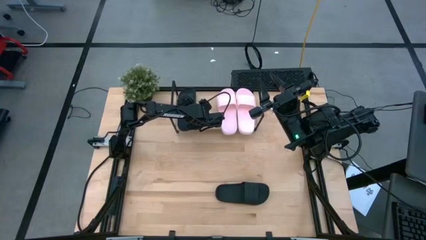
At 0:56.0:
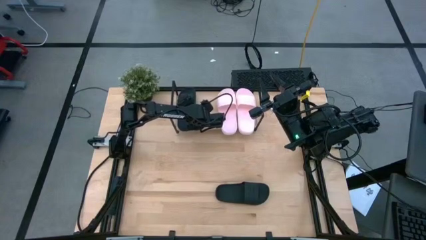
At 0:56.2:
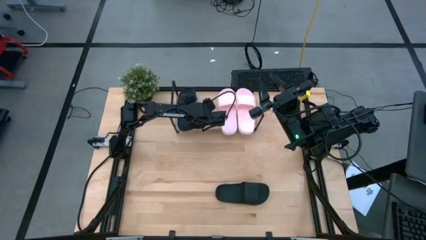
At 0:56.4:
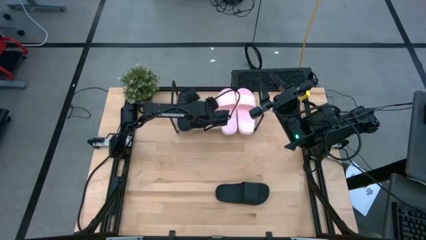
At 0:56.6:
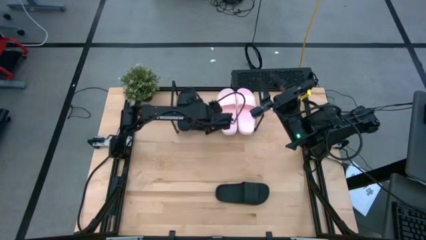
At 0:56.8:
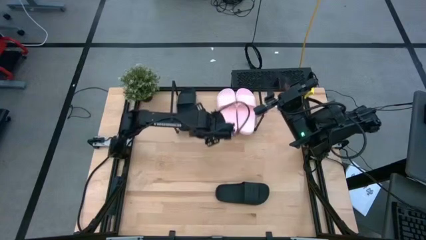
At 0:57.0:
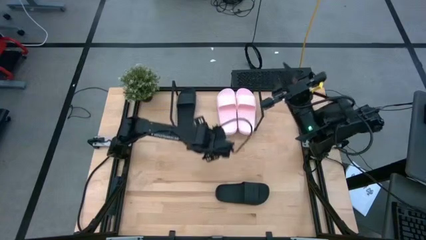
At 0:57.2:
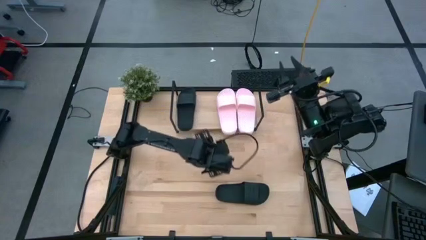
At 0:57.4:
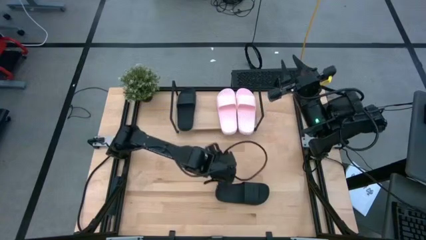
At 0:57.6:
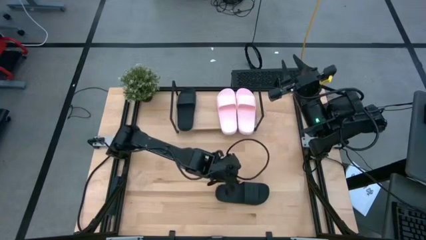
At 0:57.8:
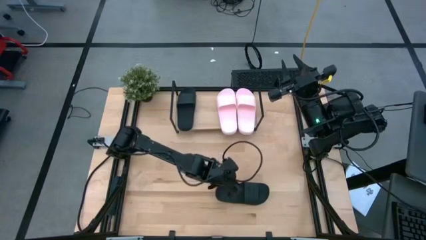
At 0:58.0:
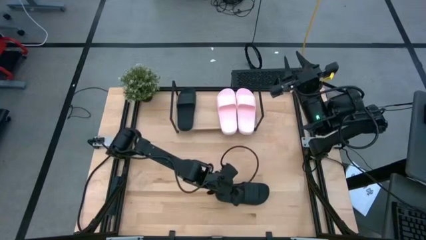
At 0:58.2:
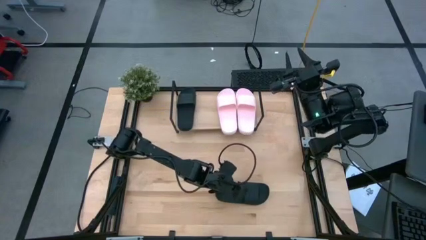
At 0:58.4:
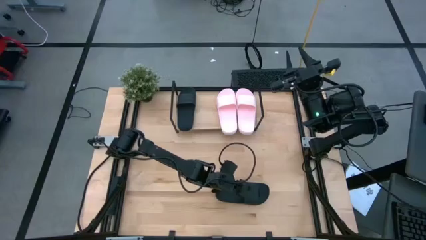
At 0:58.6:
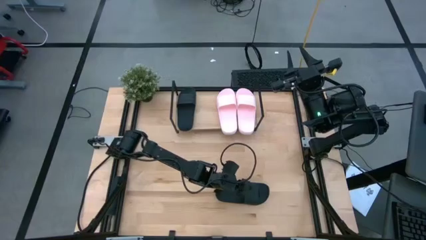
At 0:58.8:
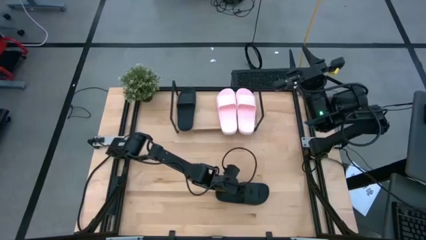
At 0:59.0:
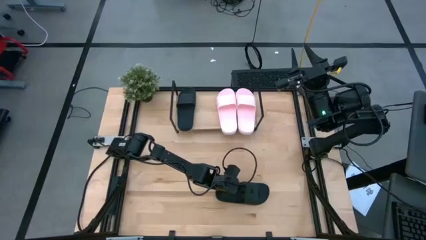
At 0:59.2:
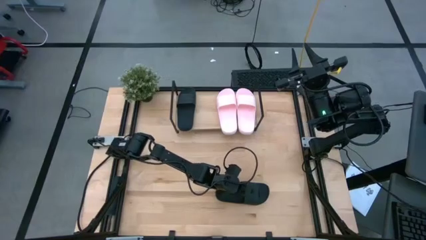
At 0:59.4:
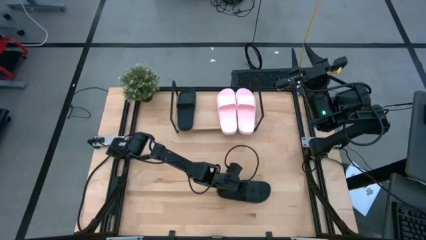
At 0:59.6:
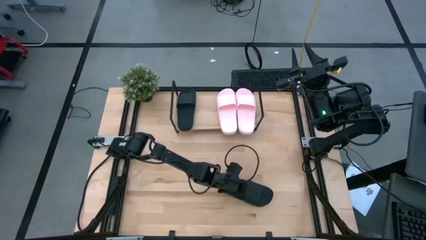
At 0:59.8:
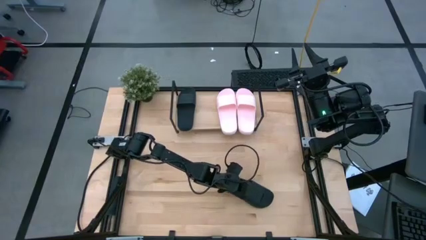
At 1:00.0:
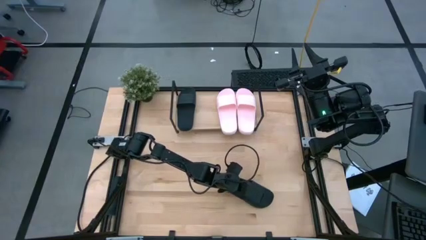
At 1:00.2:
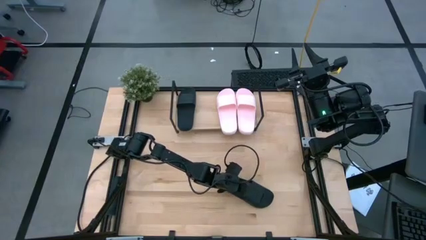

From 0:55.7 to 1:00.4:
Task: Pick and place slides into the shelf
Put the black slide on the shelf

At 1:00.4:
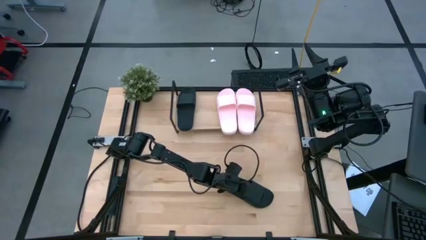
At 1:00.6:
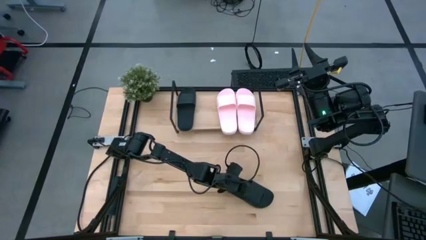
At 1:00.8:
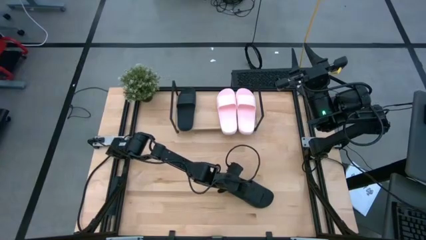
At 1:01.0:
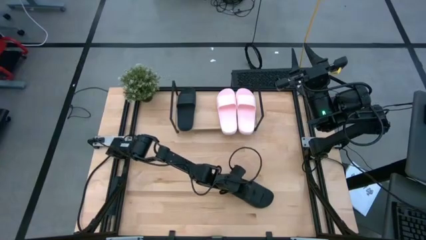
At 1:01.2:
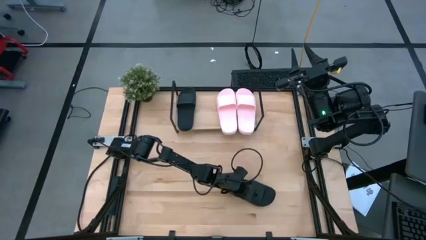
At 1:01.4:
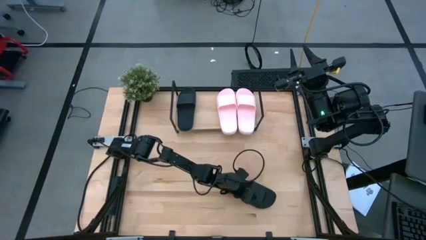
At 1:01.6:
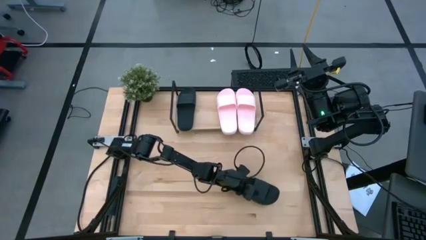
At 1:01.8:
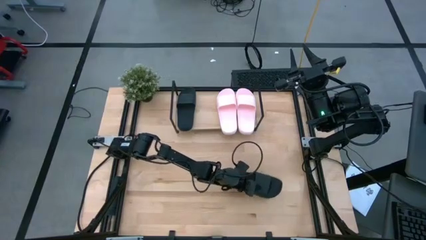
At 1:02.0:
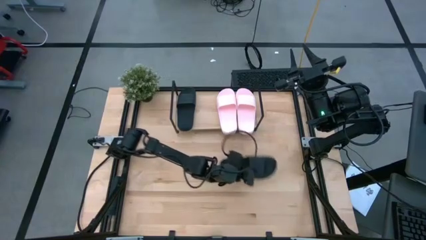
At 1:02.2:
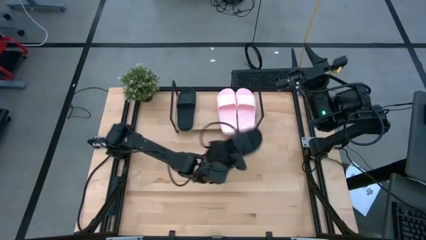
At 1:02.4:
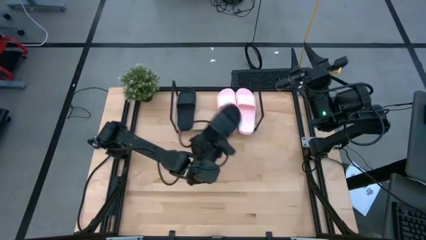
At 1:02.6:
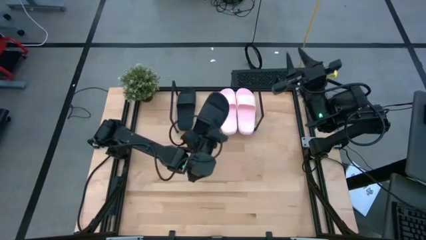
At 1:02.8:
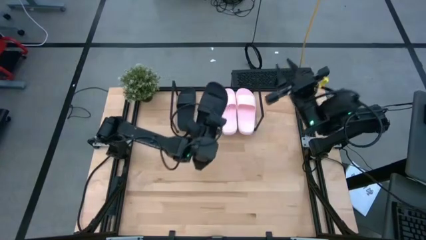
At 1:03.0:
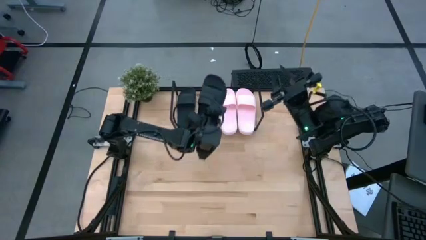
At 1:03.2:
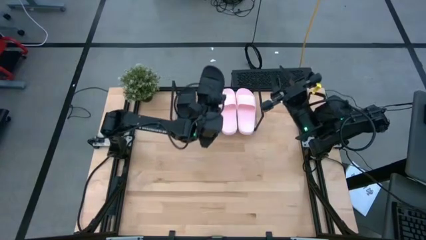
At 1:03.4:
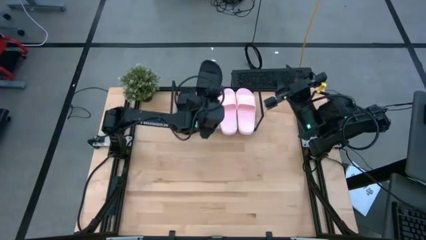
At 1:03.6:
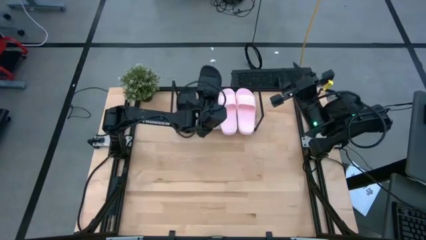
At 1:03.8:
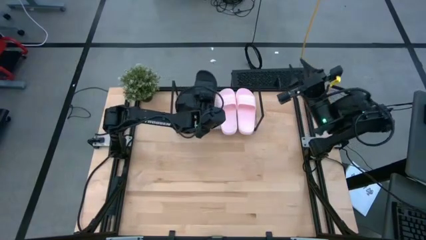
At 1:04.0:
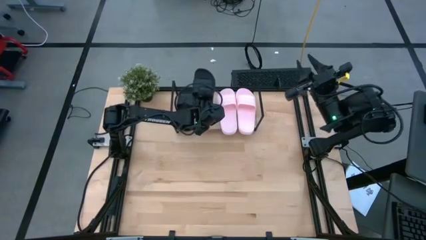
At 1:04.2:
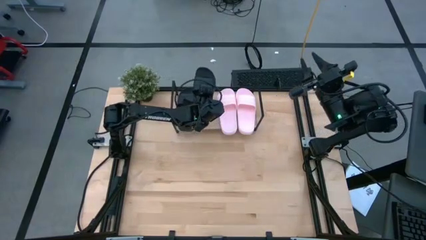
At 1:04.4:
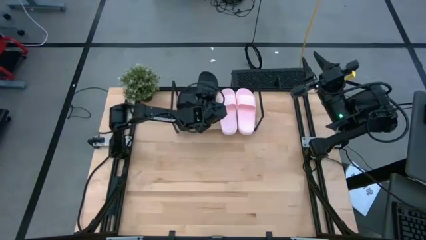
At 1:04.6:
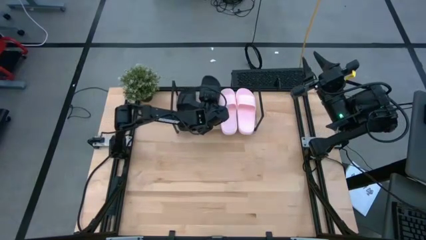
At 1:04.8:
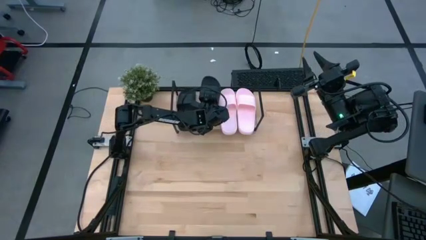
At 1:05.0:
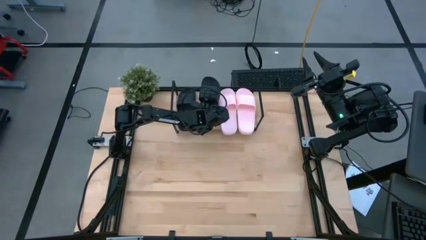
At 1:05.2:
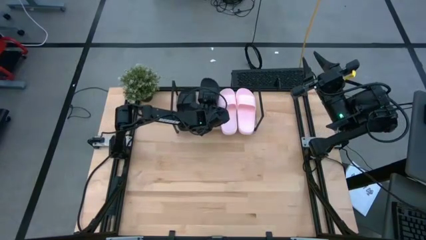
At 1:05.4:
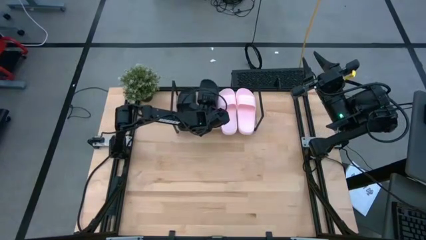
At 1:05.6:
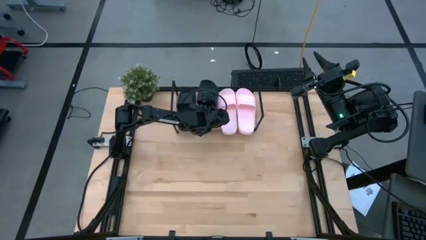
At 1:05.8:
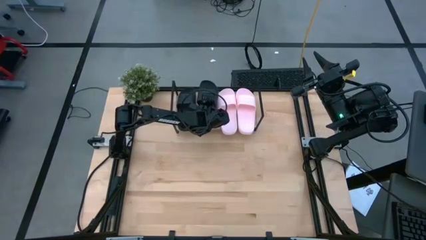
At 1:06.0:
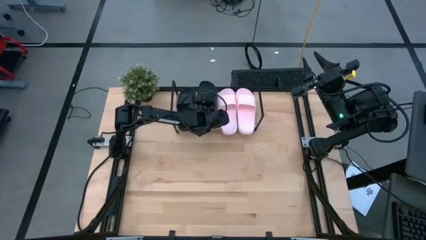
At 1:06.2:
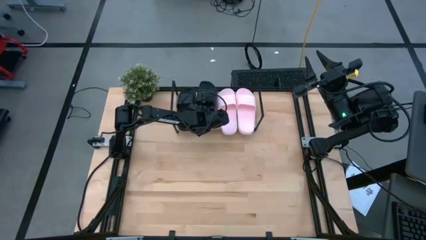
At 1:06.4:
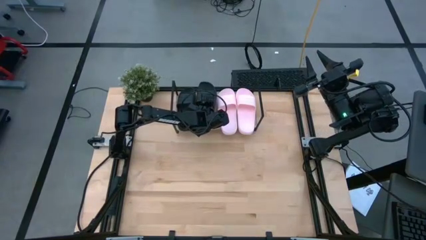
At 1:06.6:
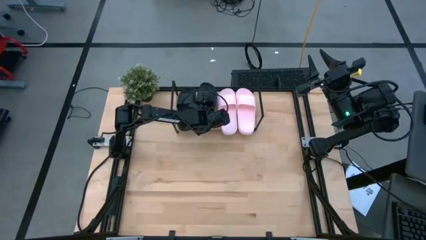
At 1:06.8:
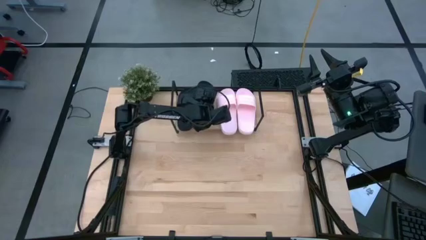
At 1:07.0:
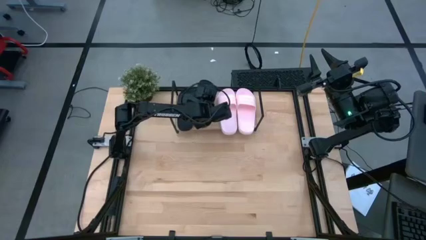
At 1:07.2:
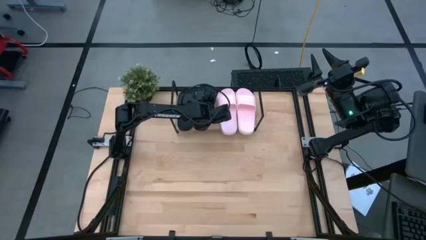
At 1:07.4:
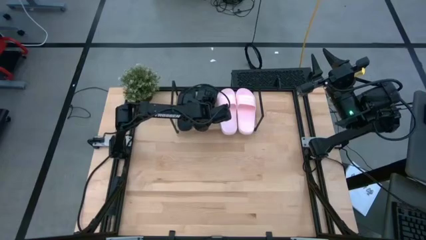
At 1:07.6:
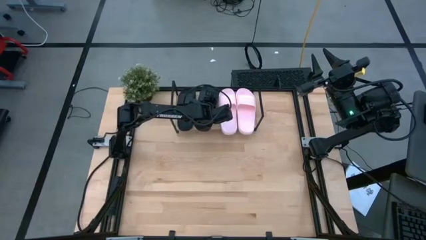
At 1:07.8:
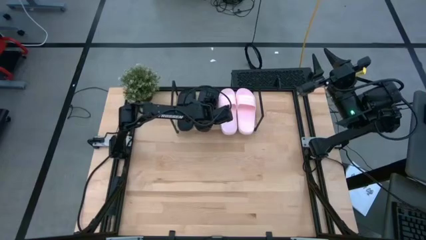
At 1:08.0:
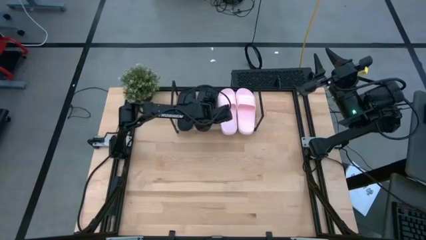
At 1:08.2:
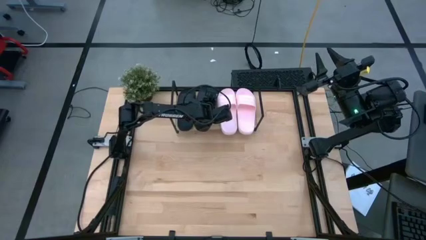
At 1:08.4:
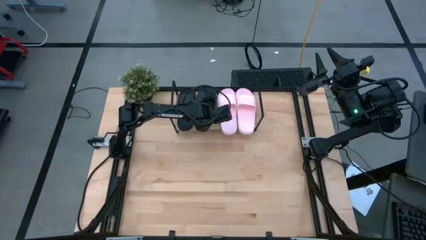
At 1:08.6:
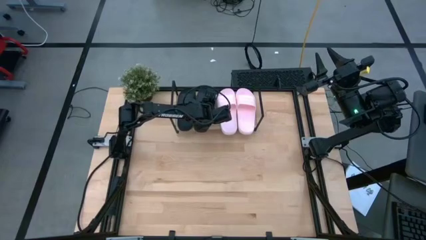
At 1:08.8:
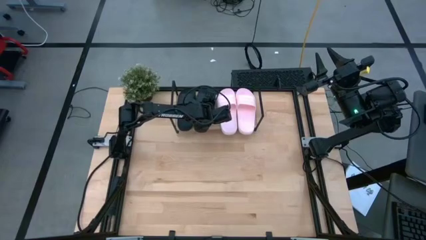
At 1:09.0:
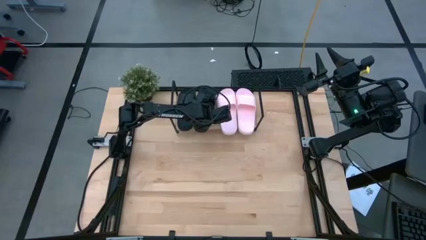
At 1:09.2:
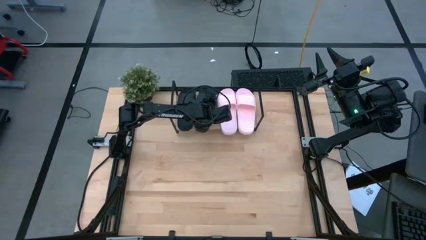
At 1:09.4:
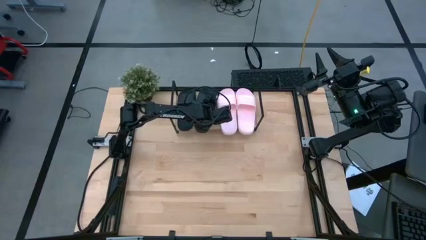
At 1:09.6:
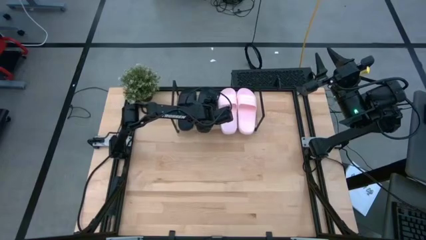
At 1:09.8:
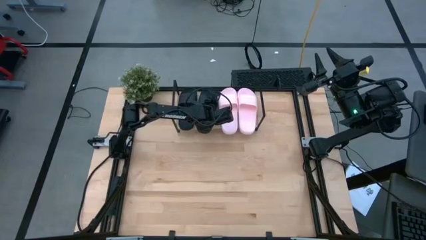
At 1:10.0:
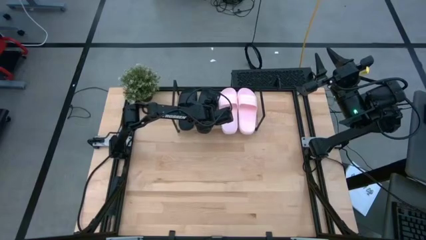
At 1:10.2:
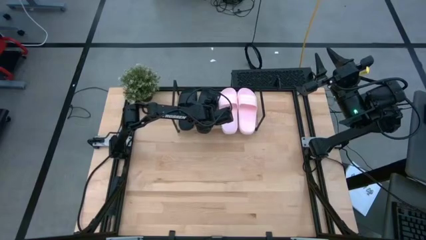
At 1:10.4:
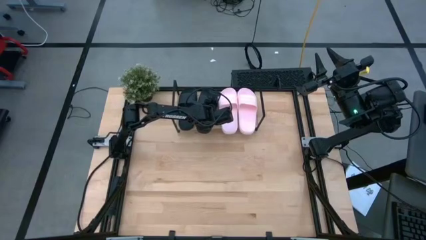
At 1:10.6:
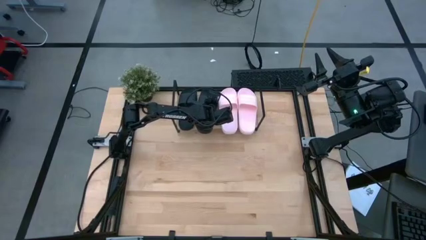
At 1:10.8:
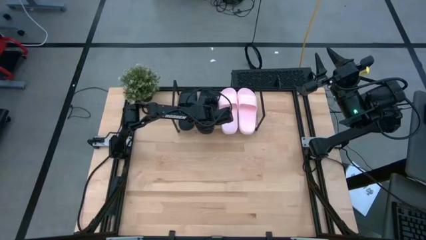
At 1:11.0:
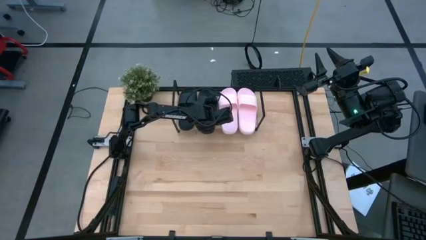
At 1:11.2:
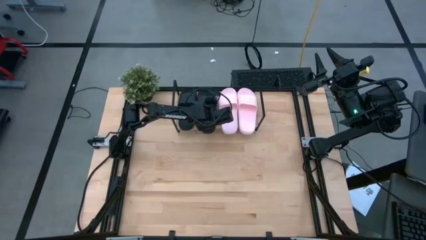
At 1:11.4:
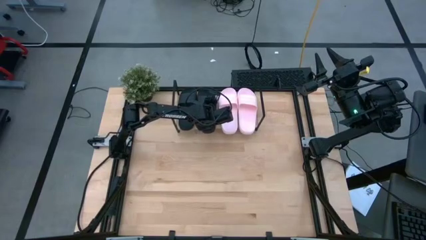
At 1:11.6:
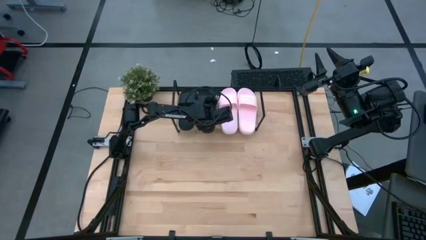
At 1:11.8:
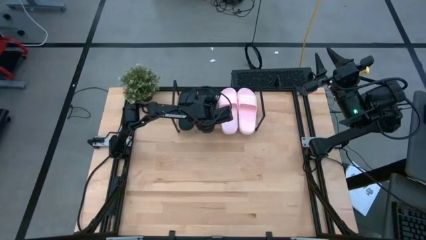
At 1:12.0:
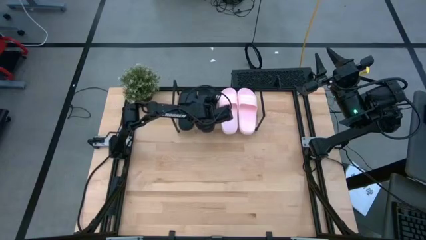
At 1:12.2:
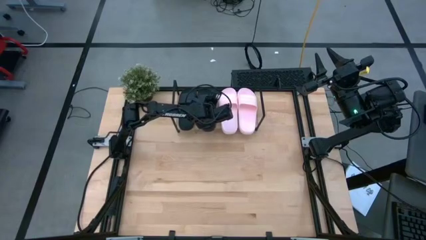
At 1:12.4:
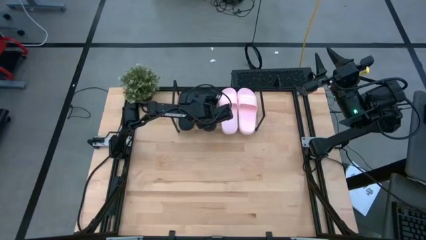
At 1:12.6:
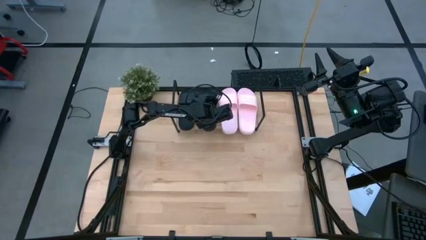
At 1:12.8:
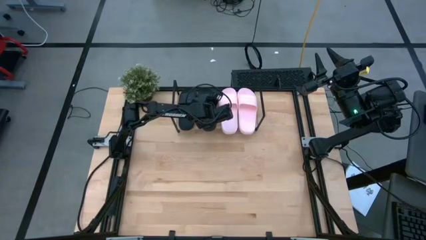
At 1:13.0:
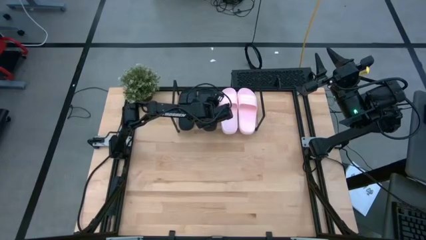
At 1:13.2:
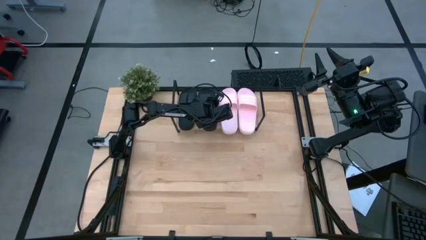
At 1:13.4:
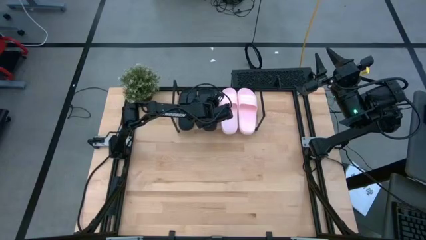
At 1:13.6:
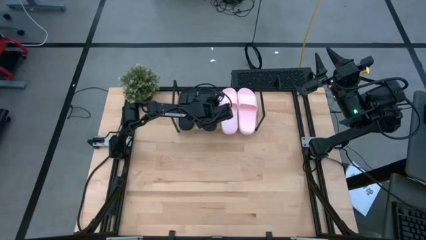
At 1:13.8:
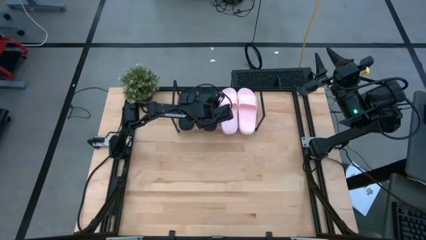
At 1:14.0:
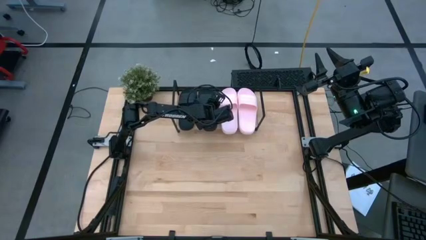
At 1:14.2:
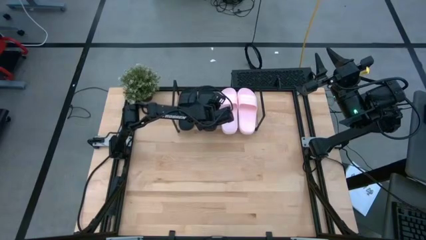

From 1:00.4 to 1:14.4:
Put the black slide on the shelf
